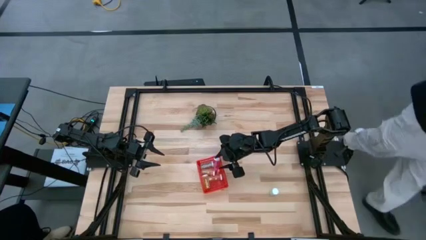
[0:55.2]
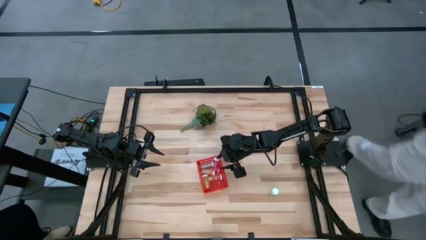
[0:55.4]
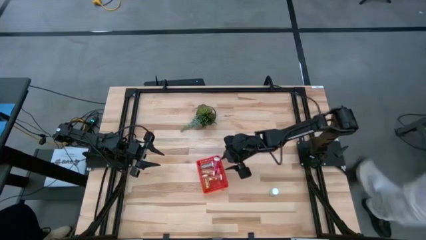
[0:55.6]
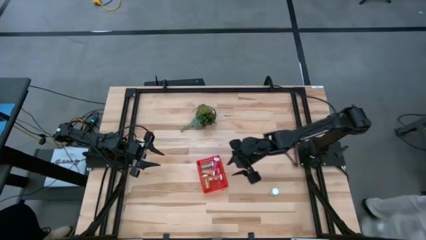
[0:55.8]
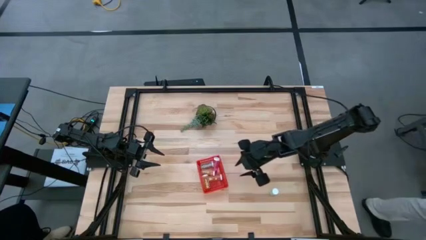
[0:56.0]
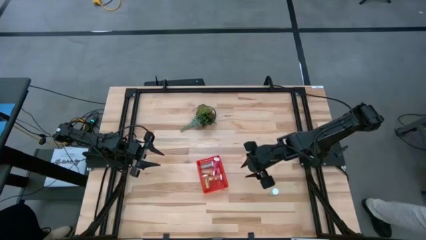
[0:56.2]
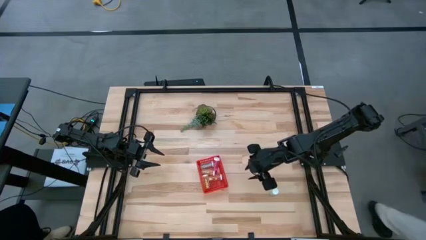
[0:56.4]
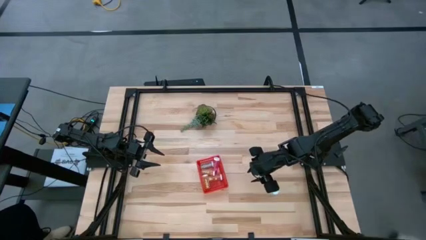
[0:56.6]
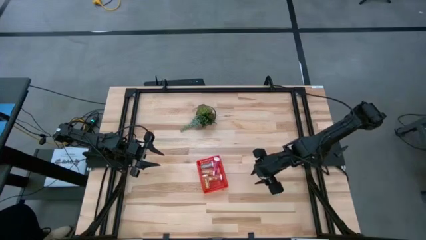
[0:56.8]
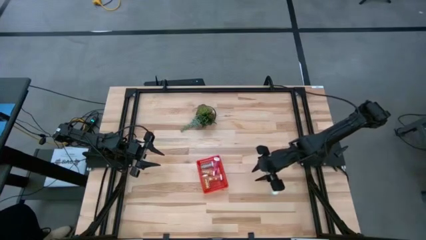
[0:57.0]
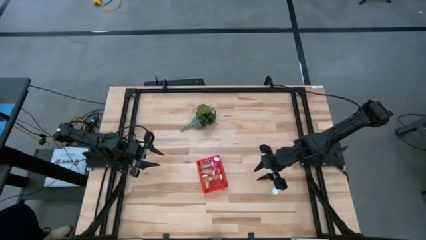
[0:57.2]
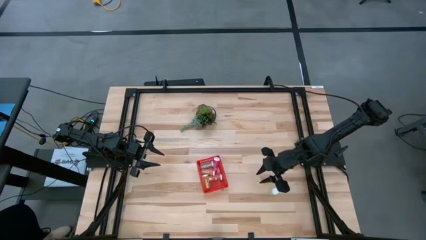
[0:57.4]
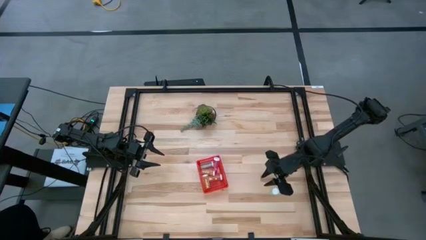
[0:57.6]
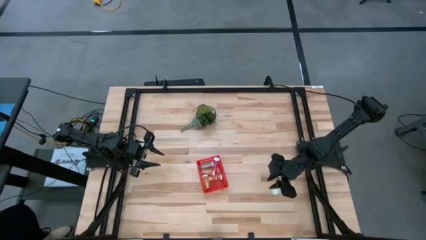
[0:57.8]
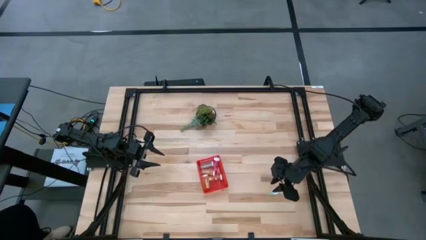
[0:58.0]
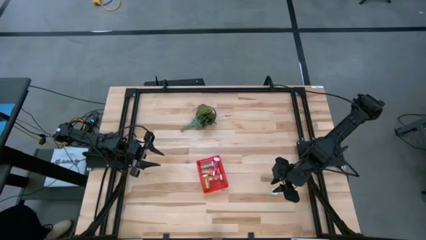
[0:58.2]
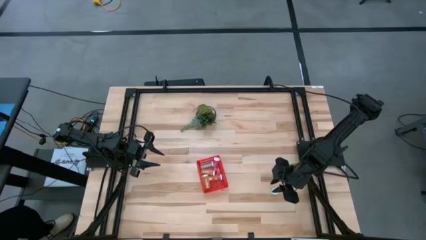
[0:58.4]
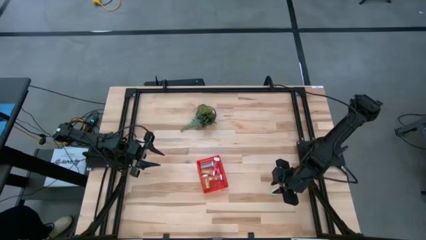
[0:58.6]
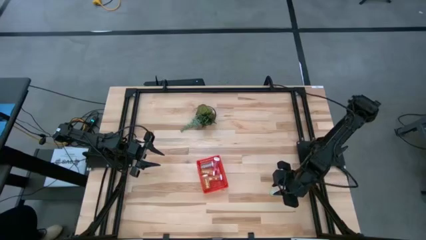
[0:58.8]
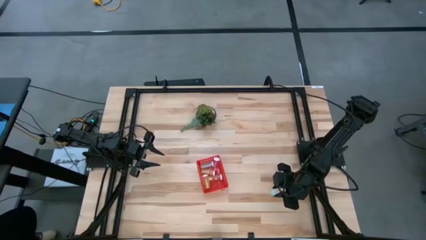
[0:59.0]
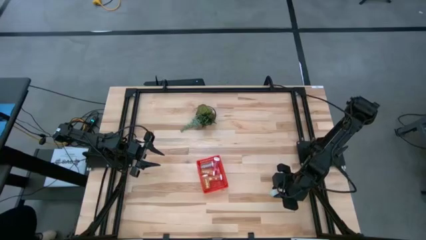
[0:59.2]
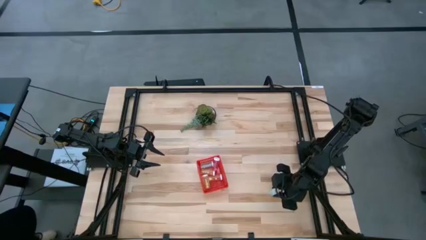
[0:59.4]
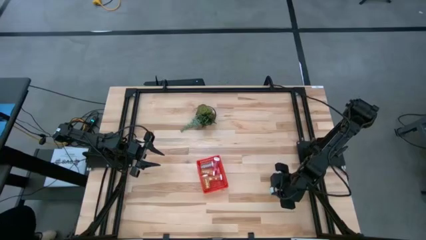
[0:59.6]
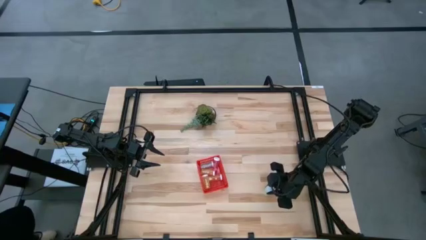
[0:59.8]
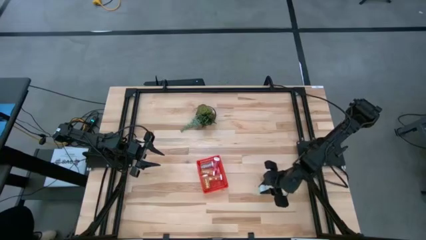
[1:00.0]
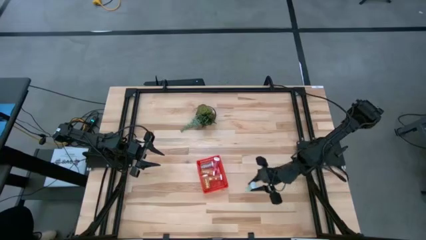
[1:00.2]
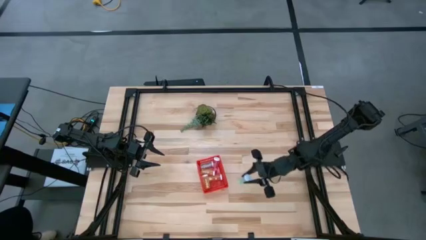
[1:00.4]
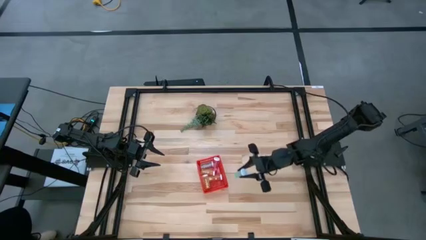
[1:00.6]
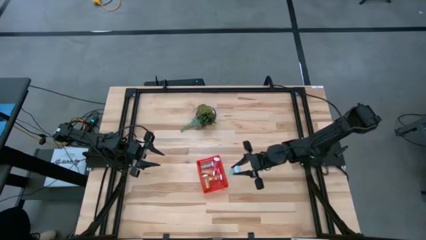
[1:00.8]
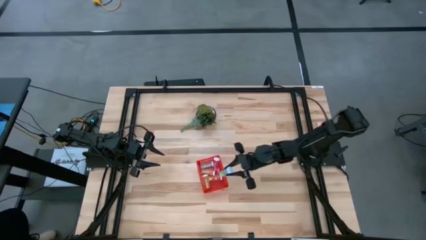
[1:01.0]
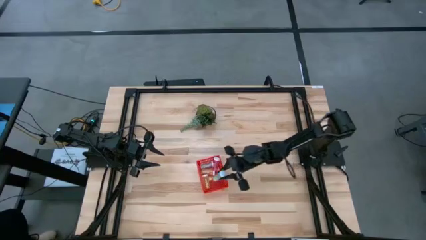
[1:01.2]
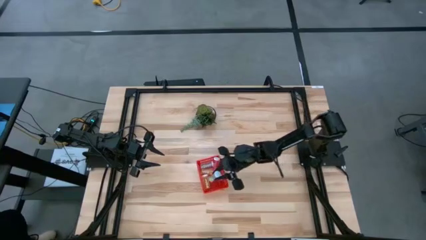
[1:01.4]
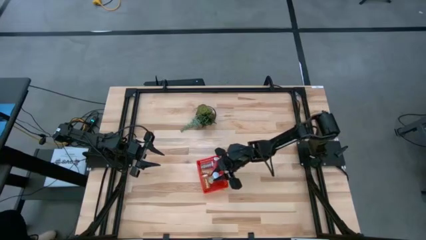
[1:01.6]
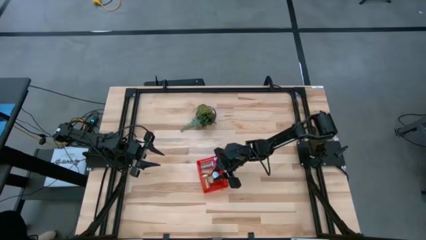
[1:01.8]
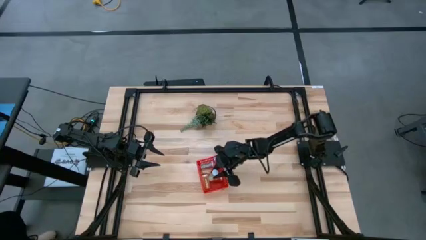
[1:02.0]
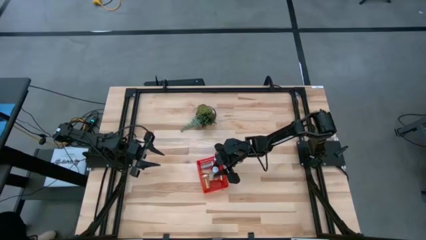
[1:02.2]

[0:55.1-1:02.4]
Task: Pick and place pill bottles into a basket
Put the blue pill bottle into the red basket

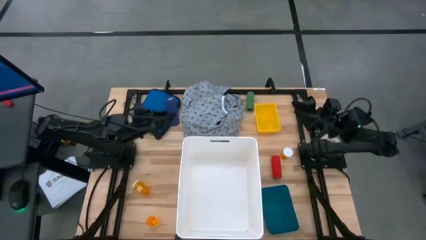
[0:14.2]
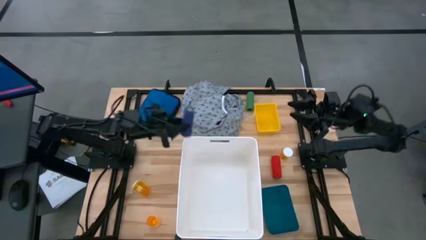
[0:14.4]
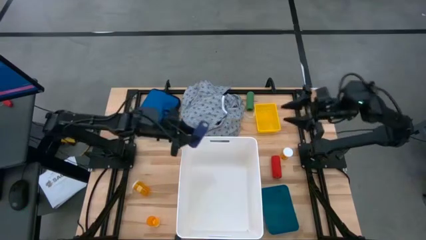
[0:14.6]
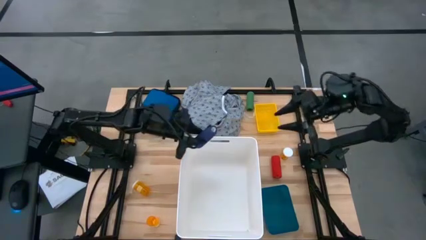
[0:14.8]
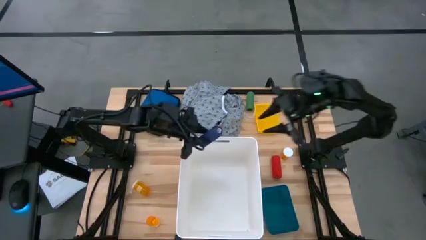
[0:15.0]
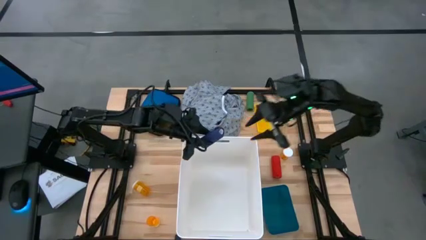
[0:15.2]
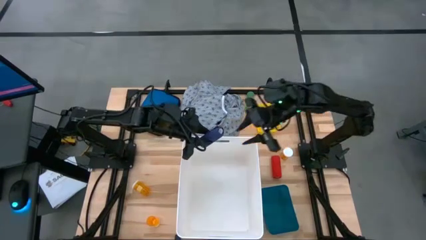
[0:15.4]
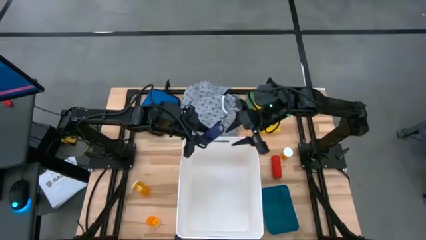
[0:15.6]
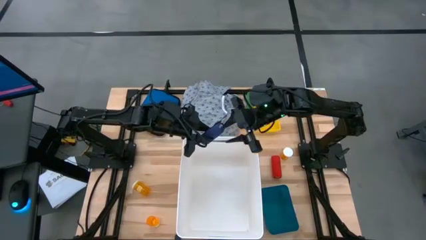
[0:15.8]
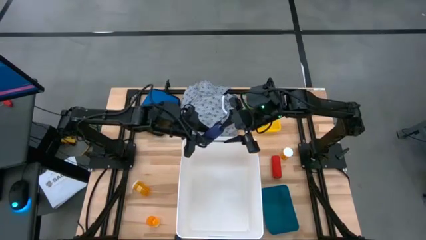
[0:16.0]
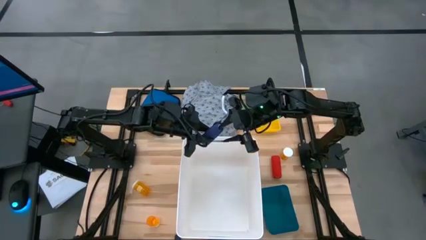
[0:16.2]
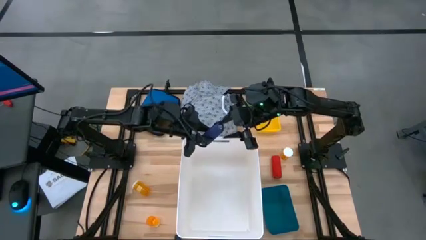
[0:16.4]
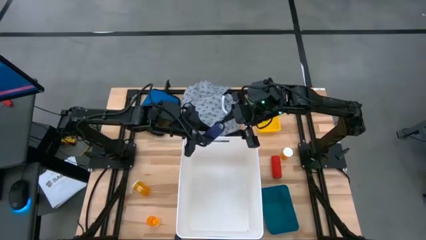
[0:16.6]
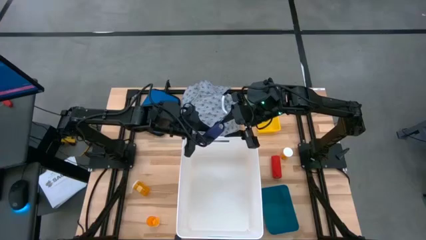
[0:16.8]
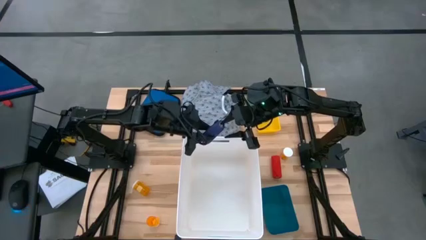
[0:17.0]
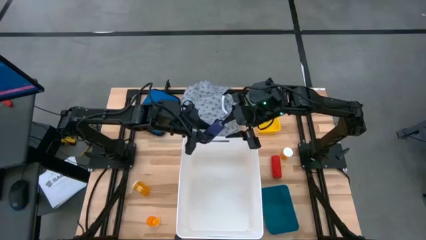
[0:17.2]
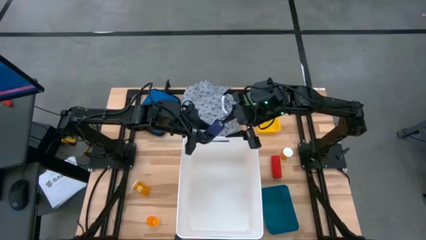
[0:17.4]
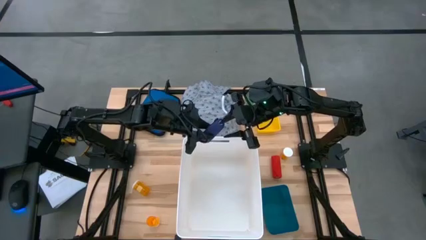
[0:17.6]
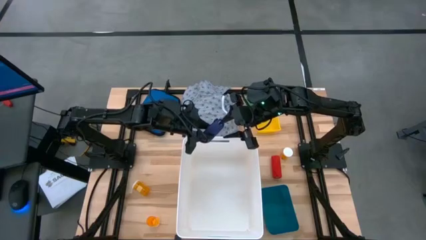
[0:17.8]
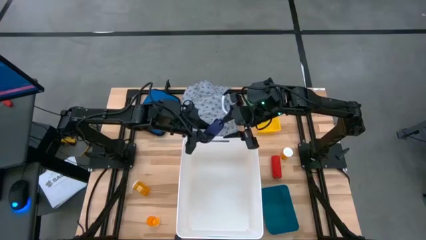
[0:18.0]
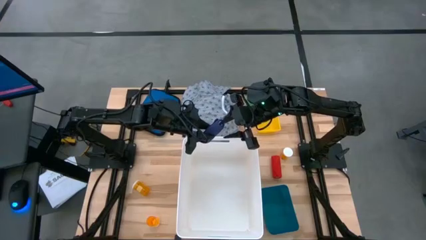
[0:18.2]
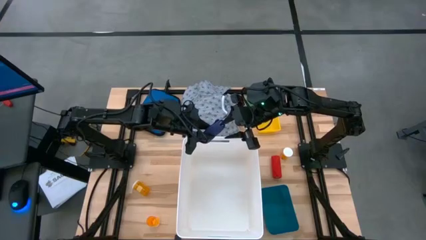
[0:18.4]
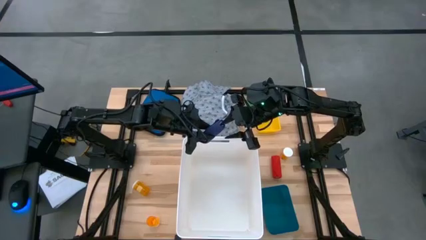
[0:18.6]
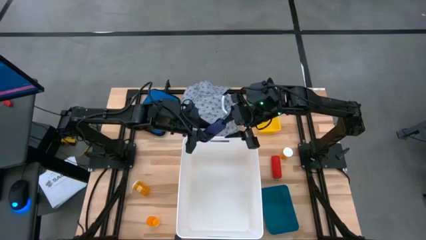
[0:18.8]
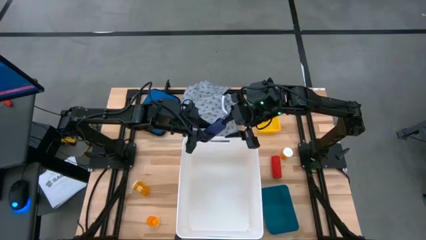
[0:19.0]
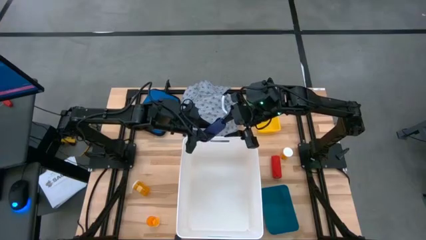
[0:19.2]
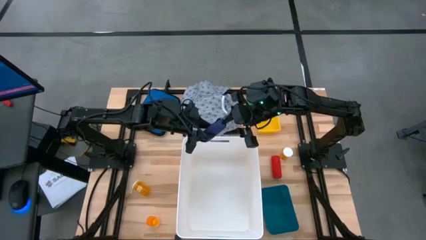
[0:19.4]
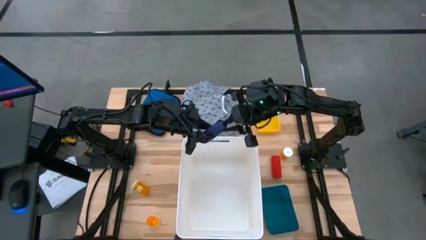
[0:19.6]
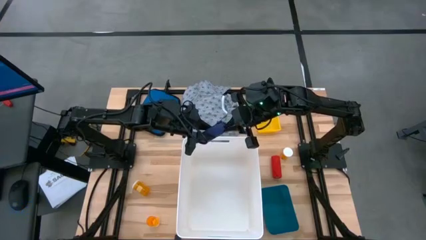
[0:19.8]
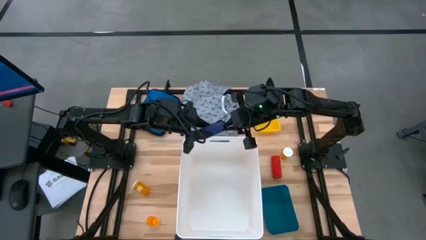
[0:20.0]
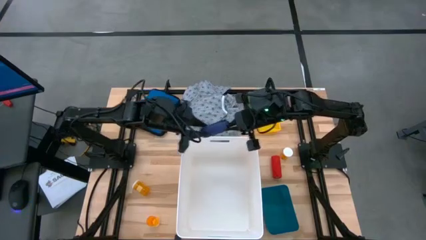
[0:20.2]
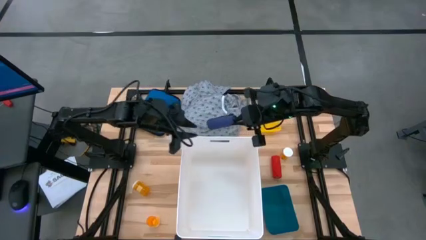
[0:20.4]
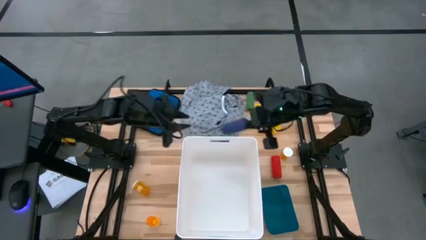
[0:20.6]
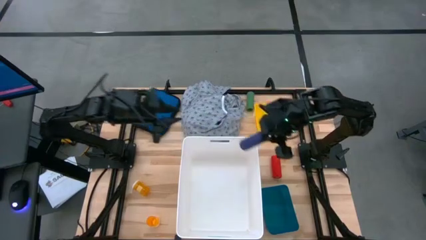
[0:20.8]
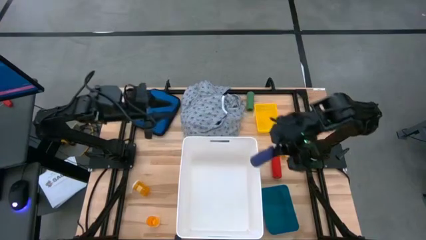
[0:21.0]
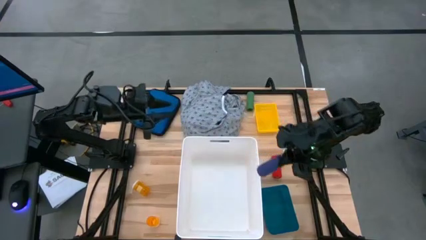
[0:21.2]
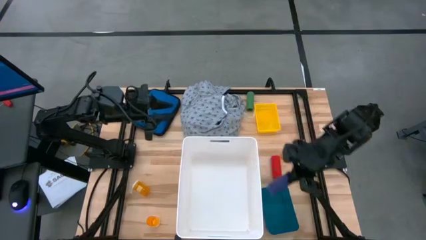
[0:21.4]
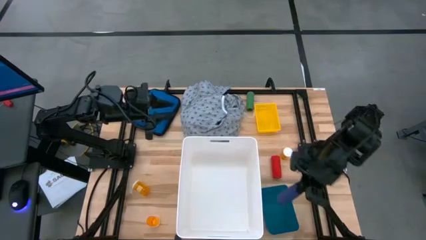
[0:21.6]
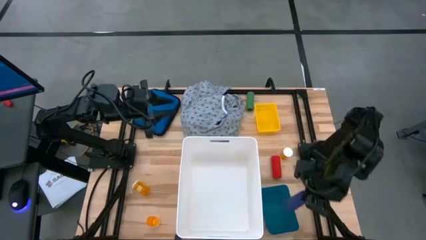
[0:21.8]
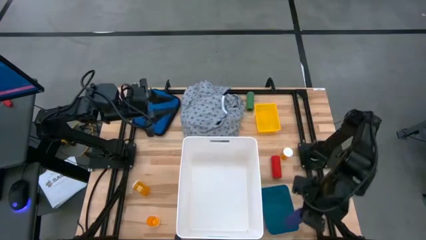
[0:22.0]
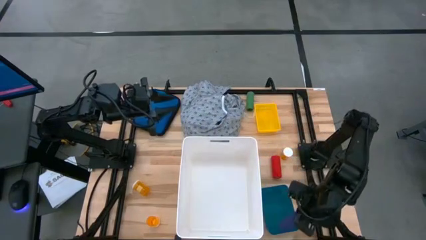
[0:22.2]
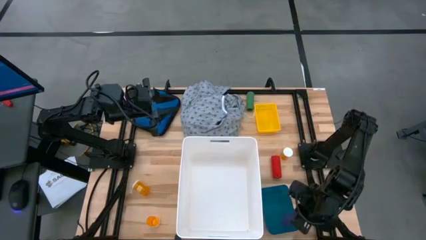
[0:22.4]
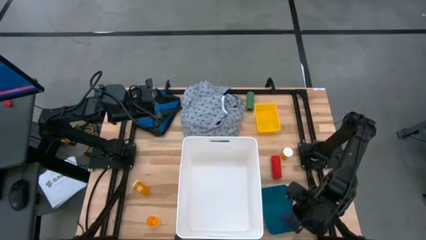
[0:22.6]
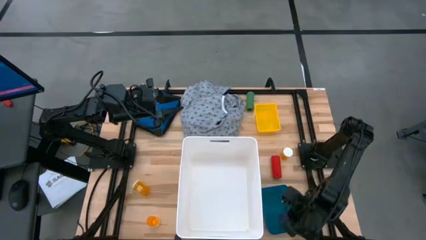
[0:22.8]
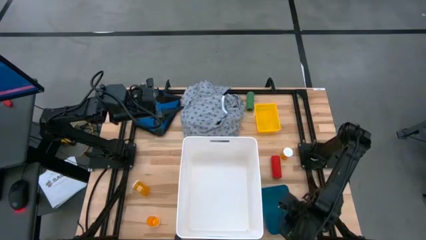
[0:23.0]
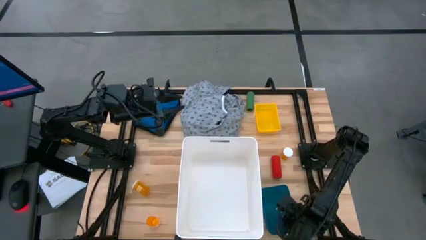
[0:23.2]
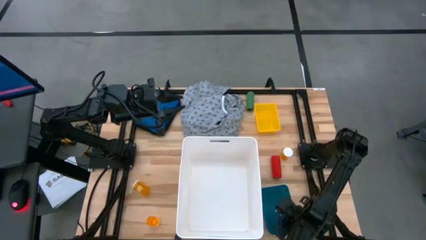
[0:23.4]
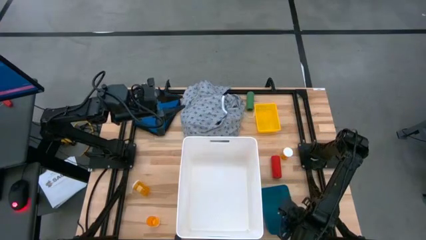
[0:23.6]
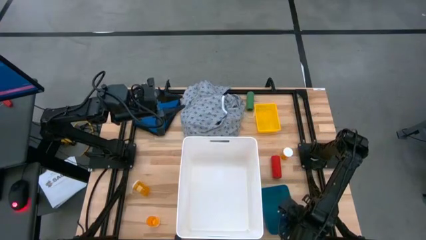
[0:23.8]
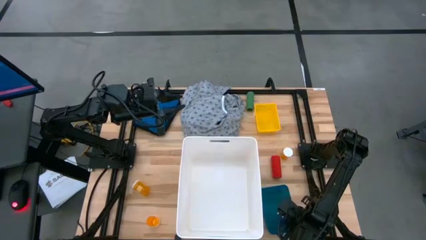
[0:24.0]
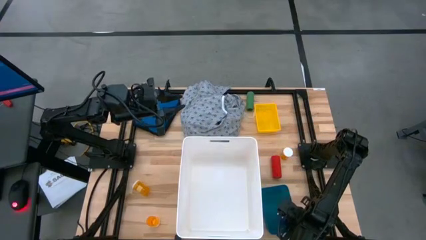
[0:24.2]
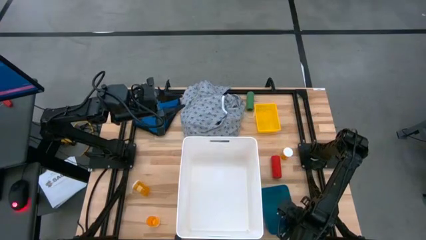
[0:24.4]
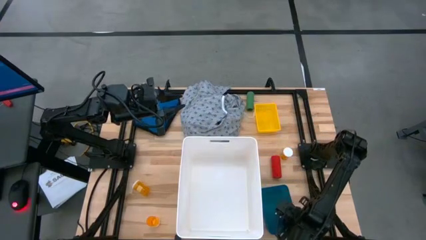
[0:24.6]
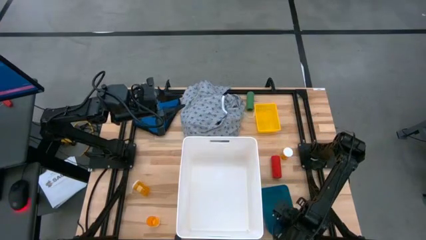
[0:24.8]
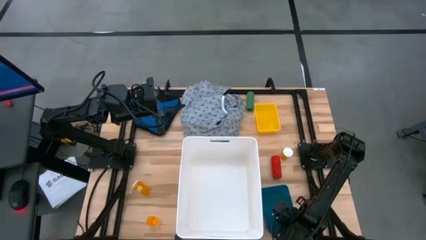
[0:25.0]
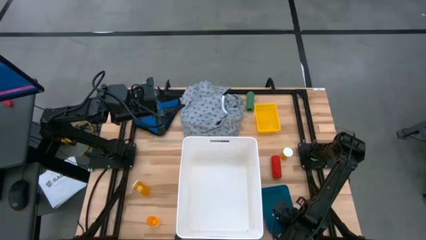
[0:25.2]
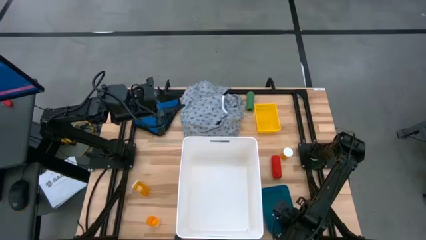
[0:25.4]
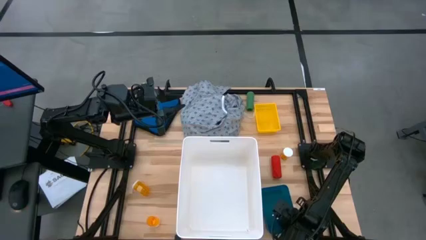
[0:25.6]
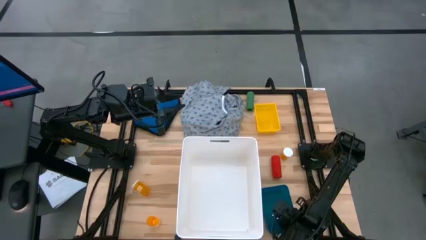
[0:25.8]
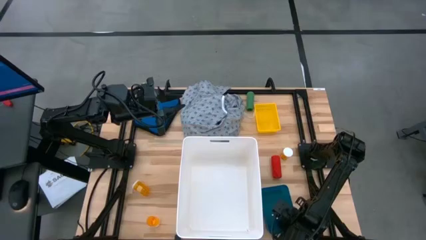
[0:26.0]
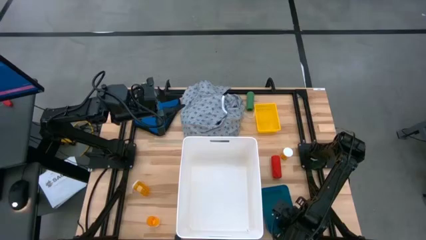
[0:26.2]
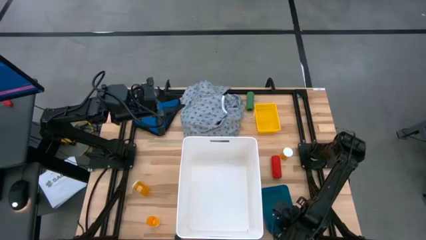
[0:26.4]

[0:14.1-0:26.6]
Task: Pick & place medical supplies in basket/bin
Put the blue bandage into the blue bin
